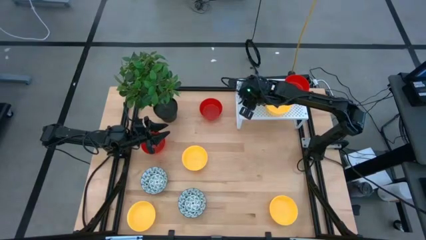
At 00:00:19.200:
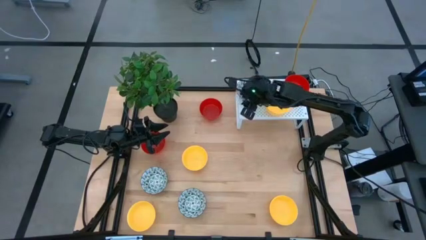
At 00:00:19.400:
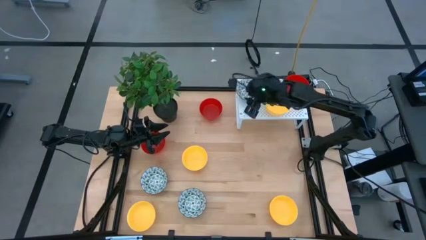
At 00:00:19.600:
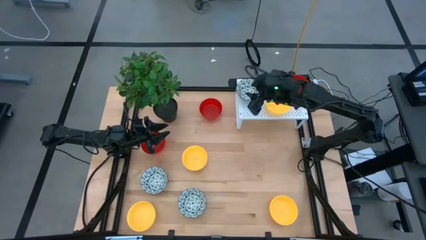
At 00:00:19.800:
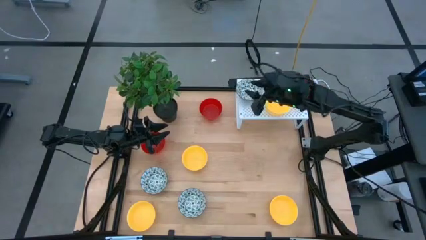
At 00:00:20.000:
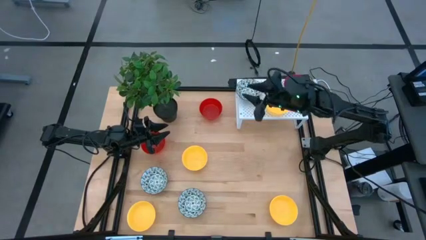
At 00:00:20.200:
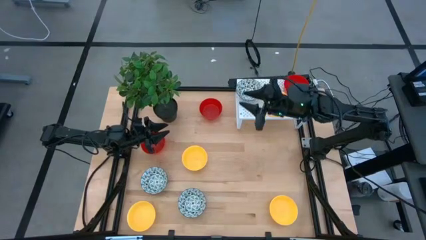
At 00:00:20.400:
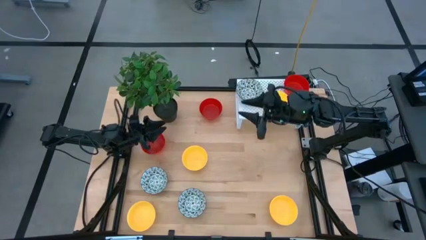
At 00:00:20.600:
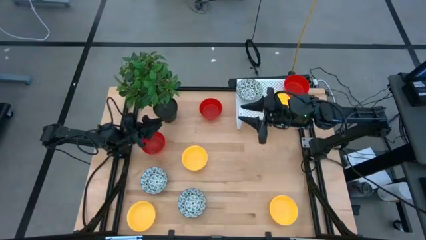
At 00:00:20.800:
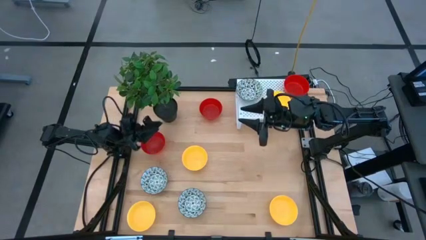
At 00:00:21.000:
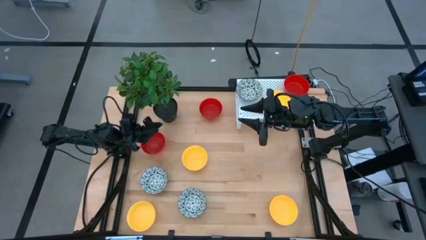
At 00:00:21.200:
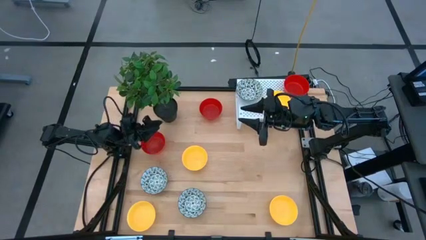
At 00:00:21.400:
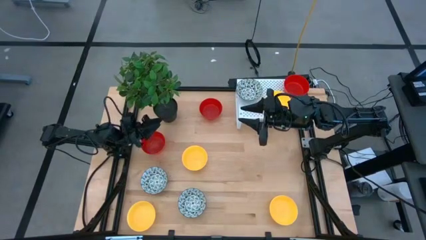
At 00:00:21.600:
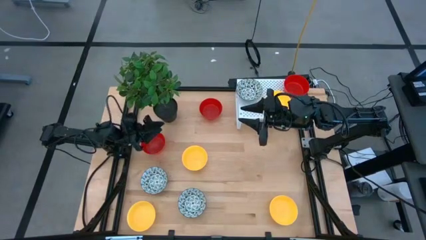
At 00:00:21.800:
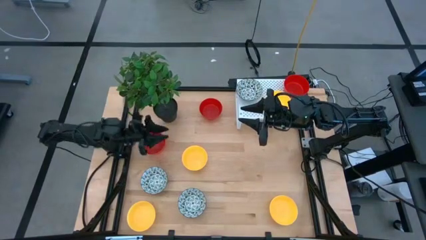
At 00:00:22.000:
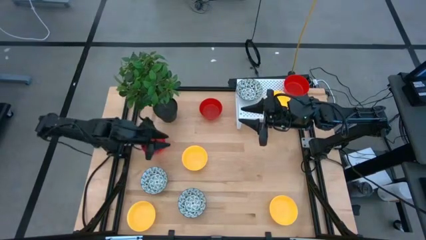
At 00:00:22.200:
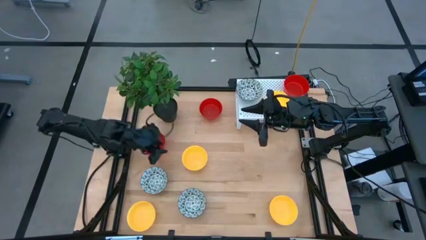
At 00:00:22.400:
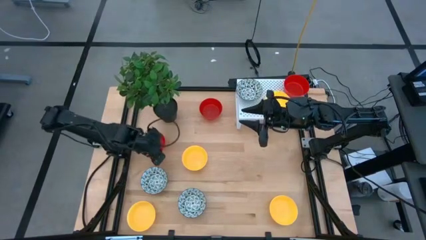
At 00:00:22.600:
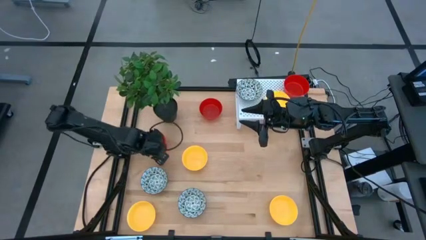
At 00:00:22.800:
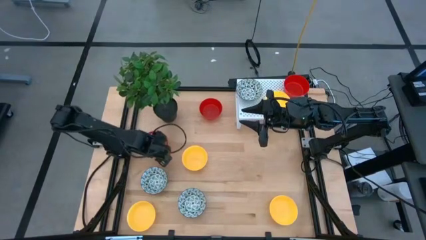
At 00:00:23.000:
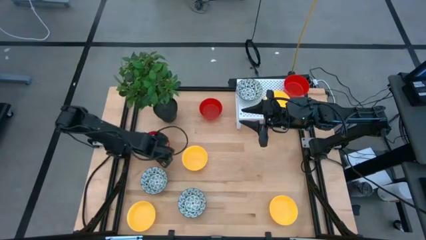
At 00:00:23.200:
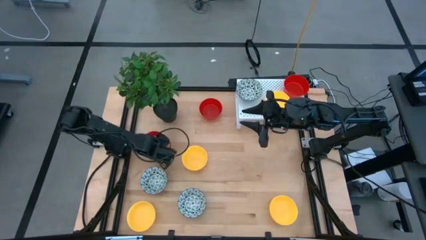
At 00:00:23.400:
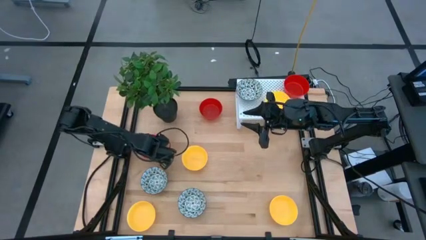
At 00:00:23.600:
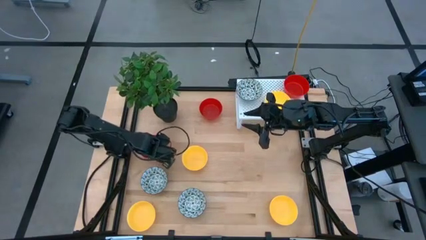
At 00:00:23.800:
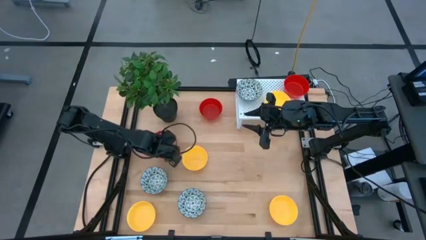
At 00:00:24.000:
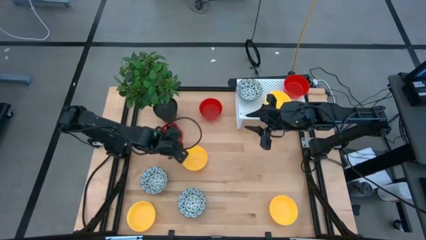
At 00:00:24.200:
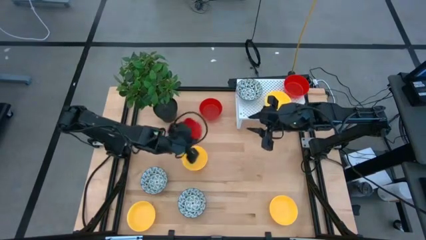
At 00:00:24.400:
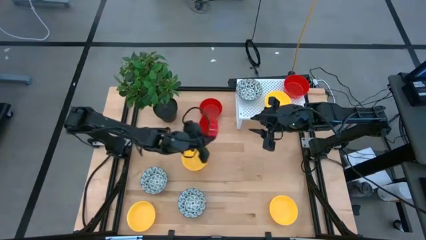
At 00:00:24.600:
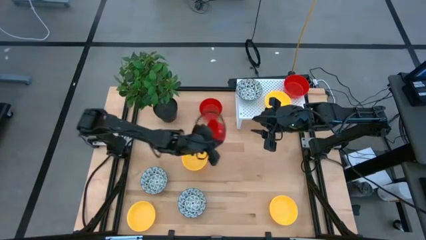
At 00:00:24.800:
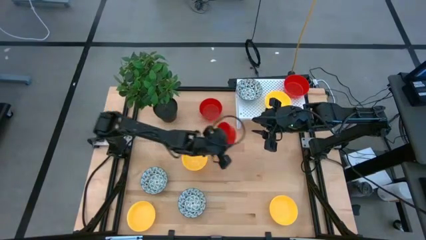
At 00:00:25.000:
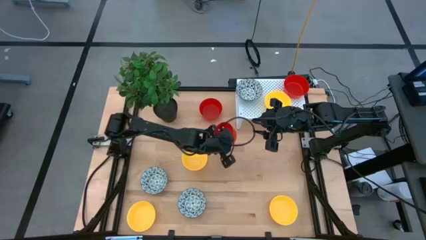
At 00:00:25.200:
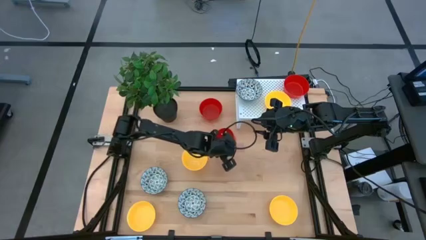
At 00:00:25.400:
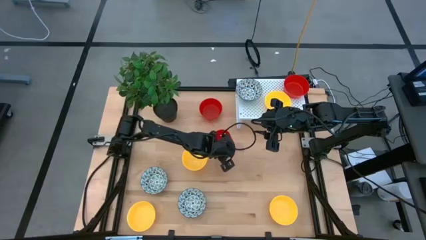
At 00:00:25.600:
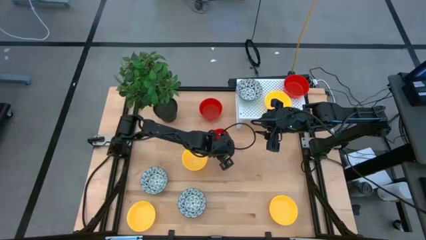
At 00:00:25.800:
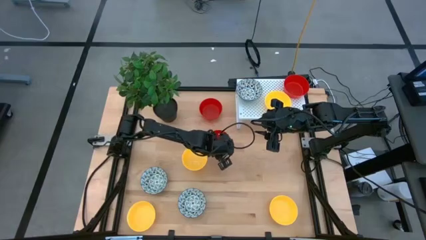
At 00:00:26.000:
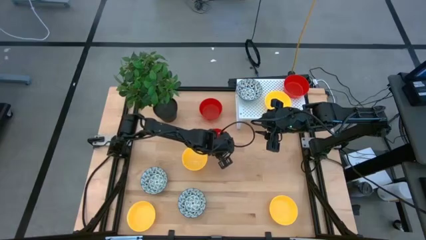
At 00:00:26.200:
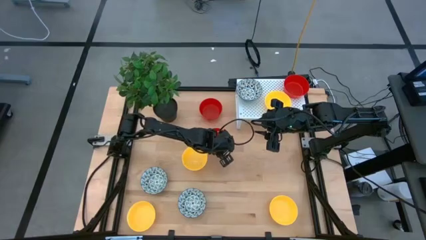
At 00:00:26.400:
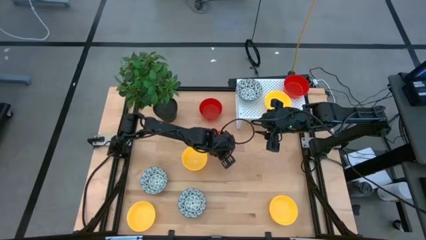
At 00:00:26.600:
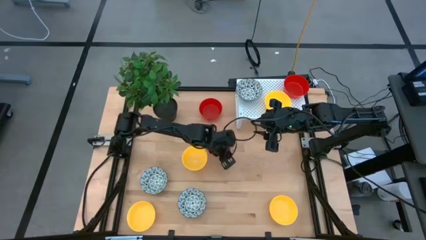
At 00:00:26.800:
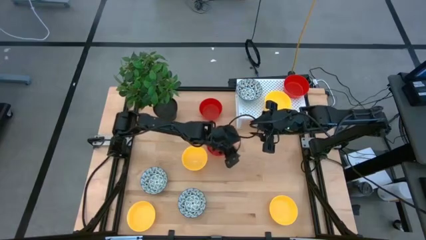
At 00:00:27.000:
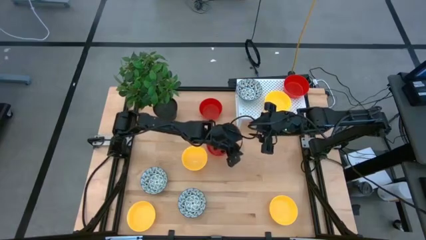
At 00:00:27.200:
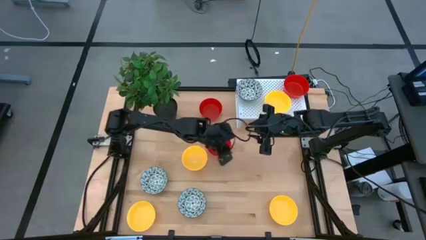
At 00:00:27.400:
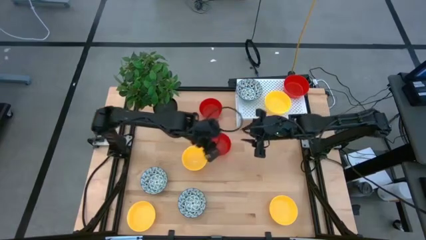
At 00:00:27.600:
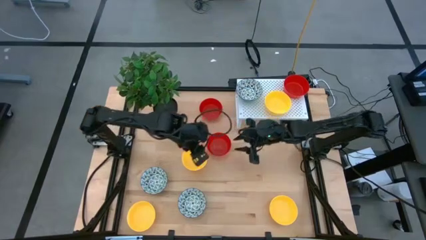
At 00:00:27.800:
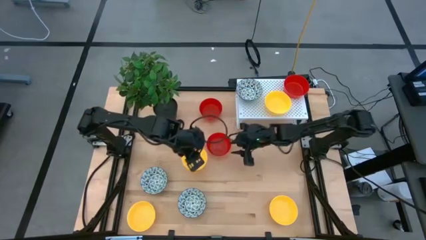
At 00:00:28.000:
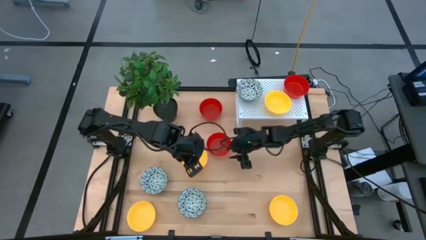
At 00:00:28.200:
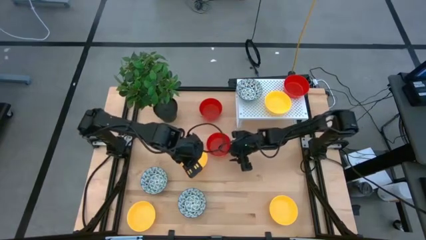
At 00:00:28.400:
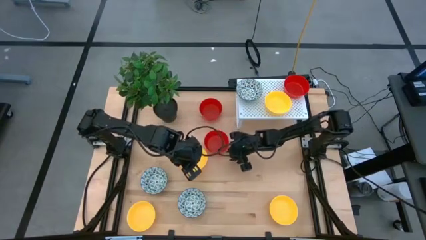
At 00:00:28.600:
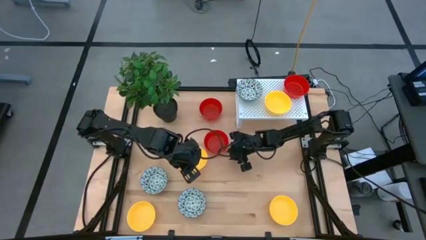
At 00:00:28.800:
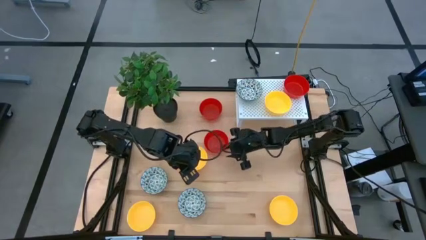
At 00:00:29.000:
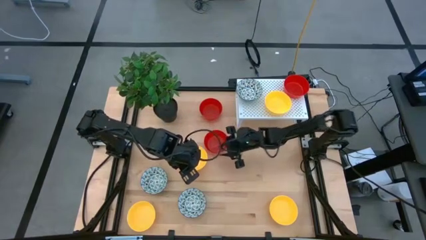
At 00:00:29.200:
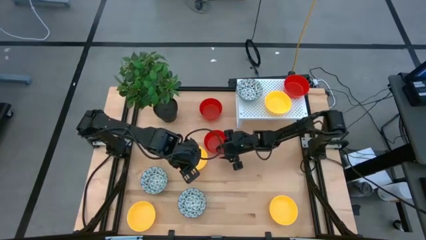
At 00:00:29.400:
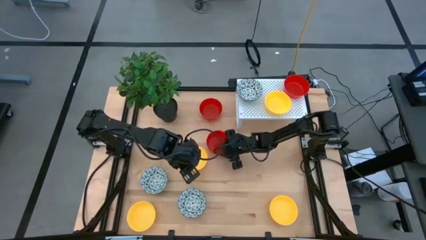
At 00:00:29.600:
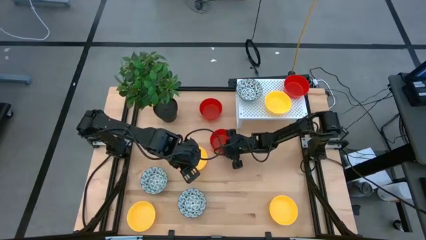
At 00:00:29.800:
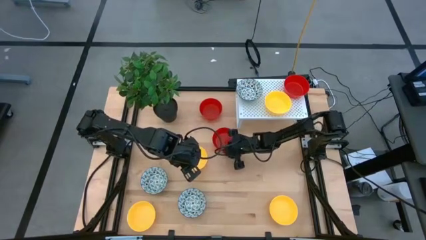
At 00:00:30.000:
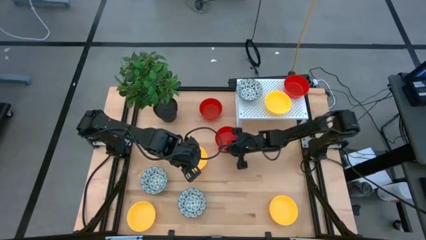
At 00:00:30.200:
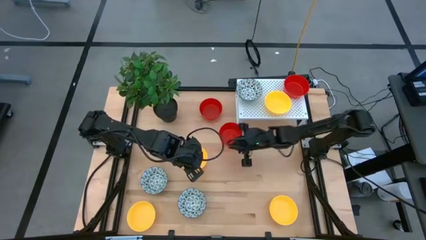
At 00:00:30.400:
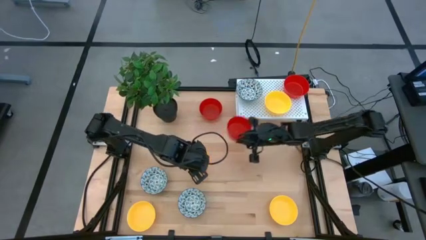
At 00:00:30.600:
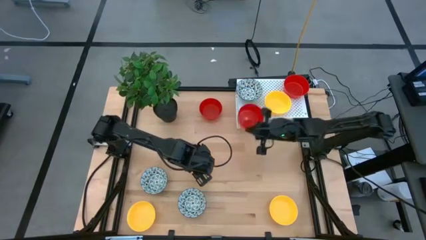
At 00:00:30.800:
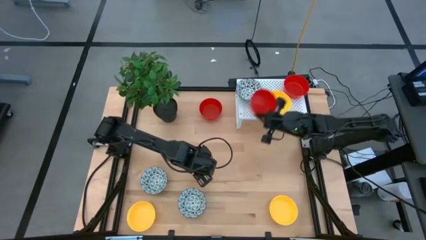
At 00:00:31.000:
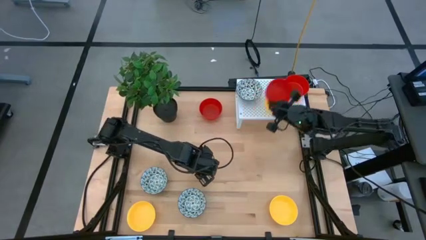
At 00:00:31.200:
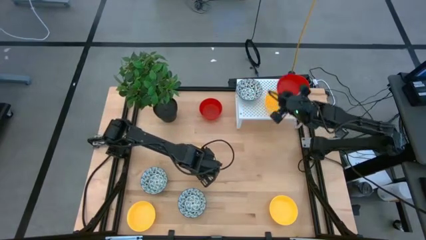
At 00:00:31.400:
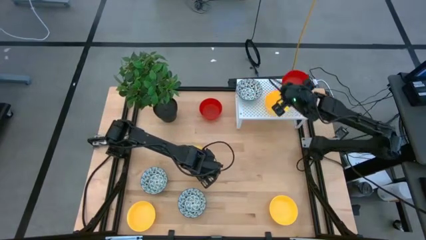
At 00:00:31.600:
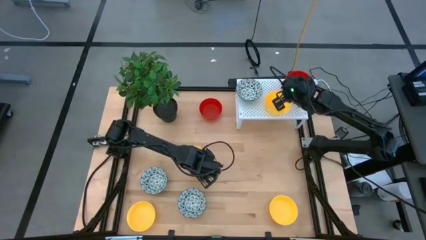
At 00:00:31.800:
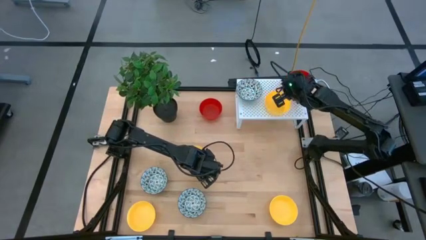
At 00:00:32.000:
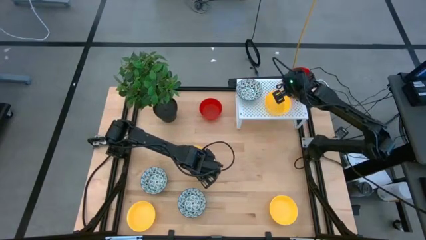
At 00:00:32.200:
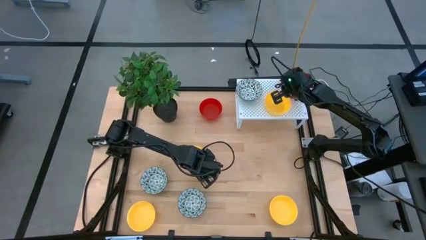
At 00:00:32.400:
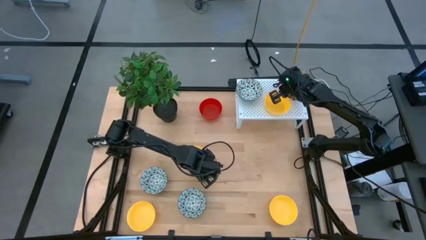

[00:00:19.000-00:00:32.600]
Task: Pick & Place Mini bowls
Stack the red bowl on the red bowl on the shelf
